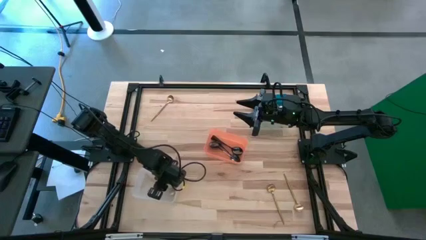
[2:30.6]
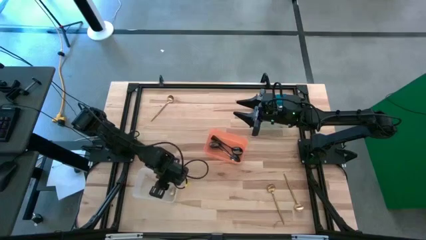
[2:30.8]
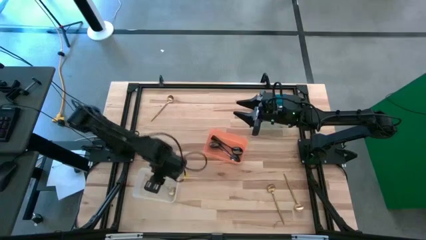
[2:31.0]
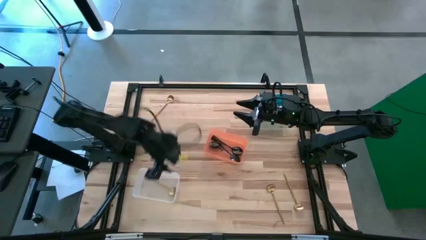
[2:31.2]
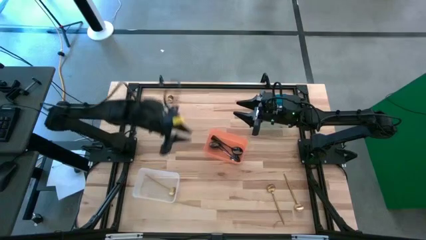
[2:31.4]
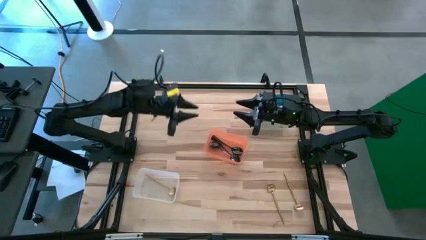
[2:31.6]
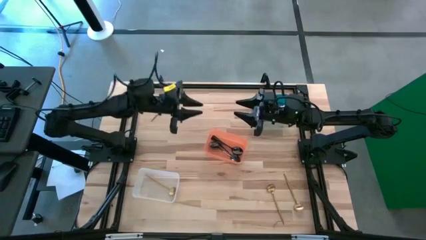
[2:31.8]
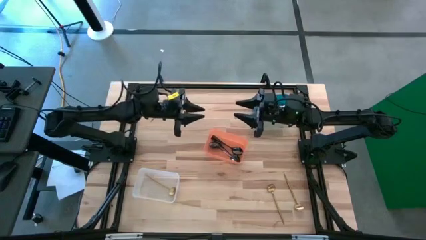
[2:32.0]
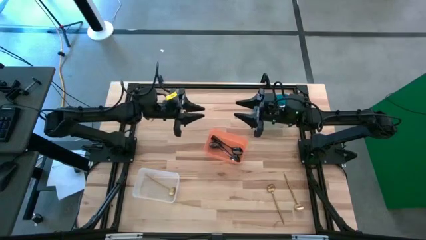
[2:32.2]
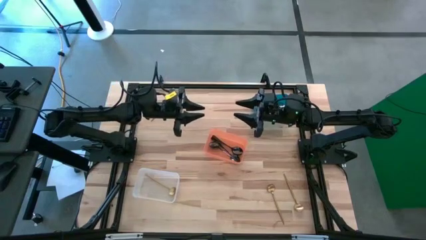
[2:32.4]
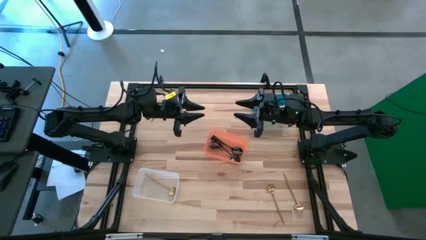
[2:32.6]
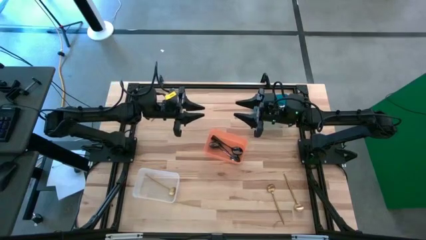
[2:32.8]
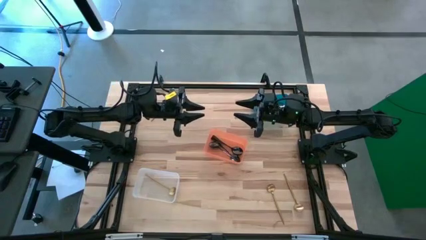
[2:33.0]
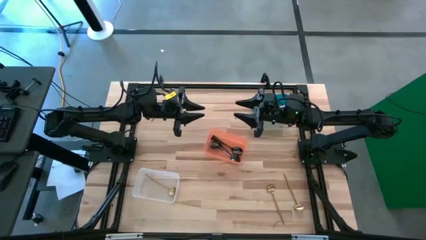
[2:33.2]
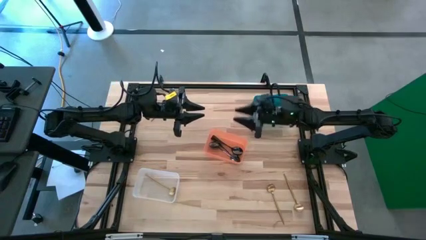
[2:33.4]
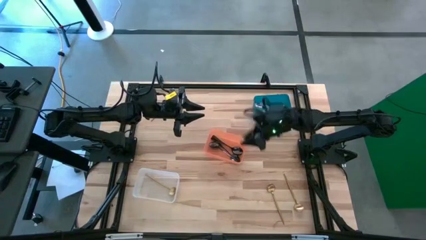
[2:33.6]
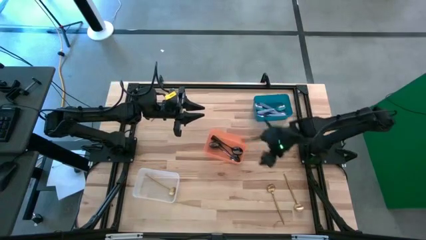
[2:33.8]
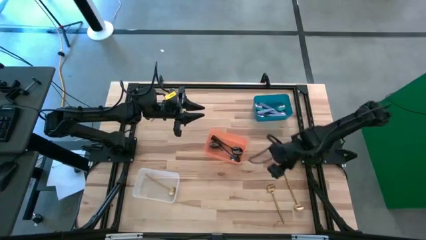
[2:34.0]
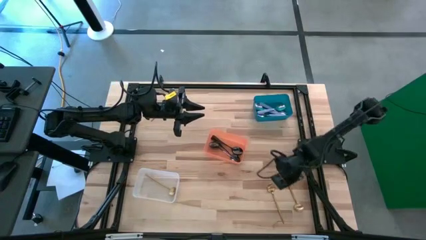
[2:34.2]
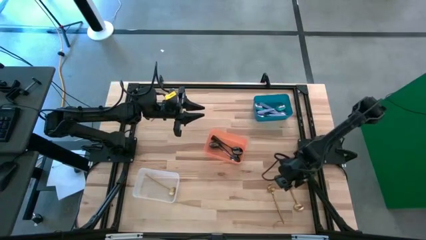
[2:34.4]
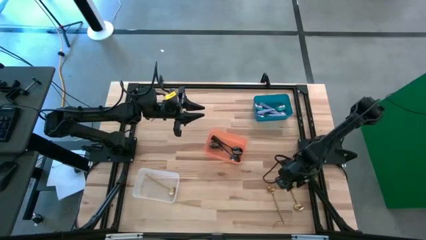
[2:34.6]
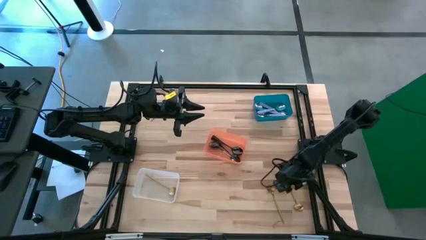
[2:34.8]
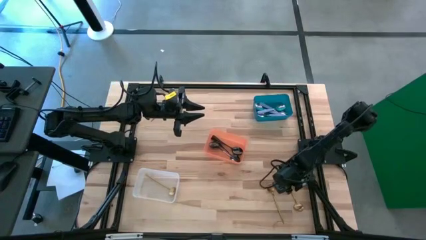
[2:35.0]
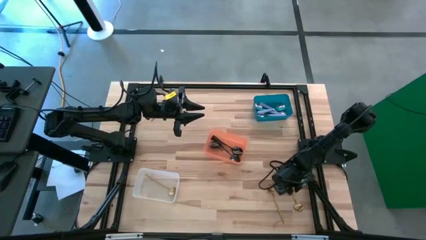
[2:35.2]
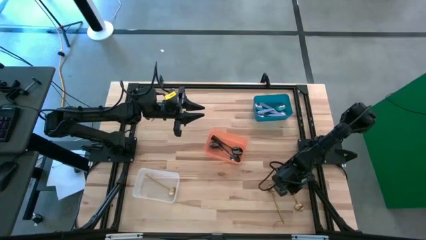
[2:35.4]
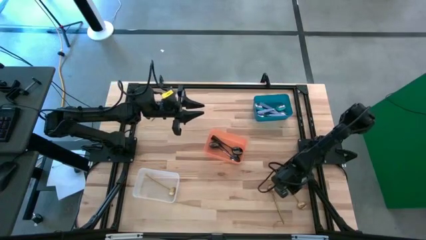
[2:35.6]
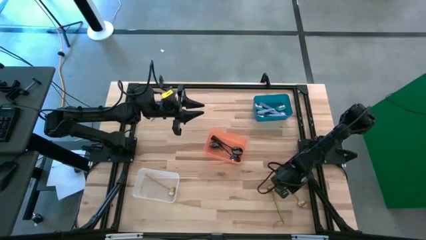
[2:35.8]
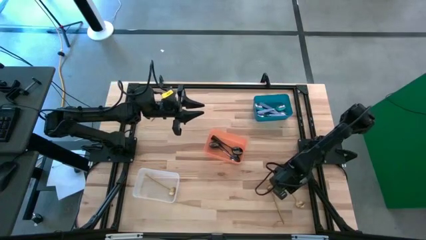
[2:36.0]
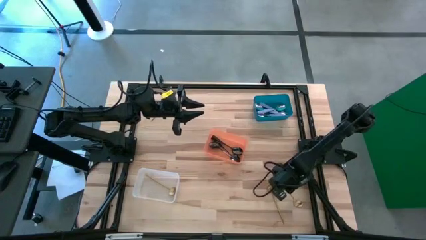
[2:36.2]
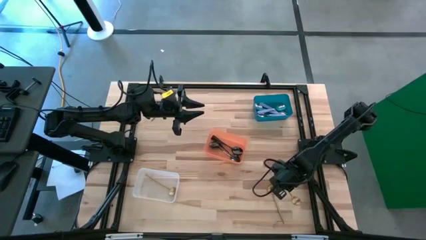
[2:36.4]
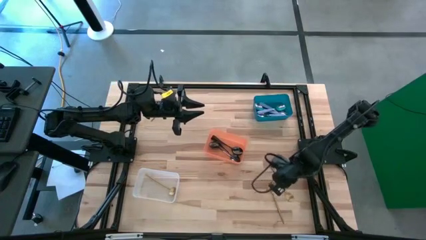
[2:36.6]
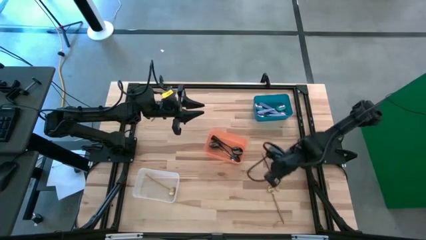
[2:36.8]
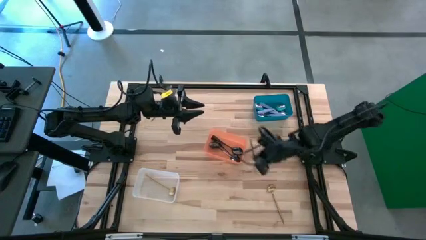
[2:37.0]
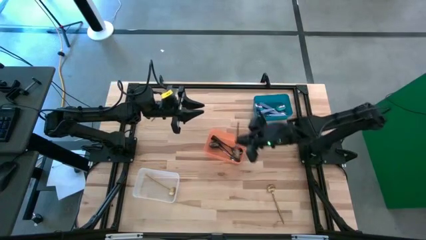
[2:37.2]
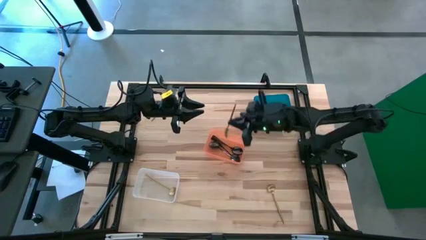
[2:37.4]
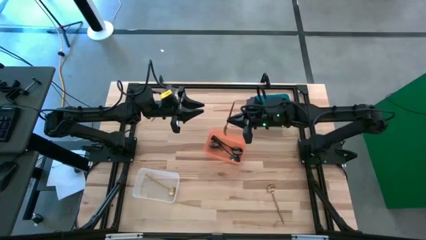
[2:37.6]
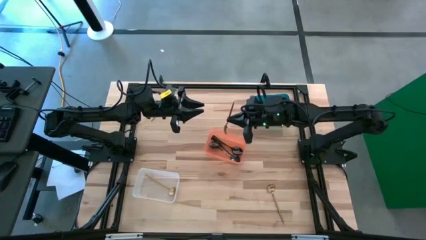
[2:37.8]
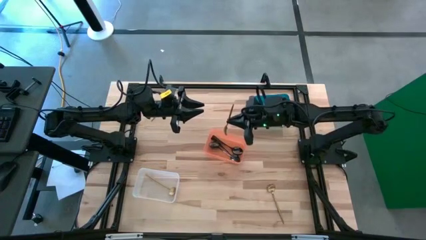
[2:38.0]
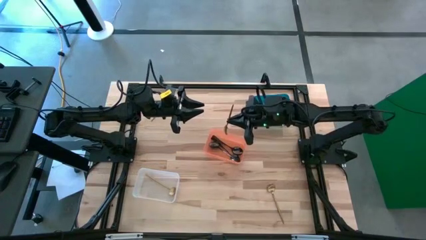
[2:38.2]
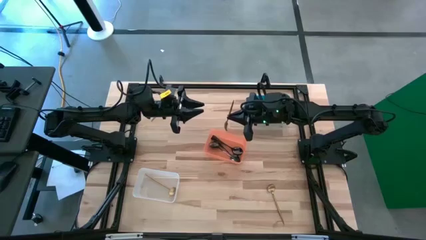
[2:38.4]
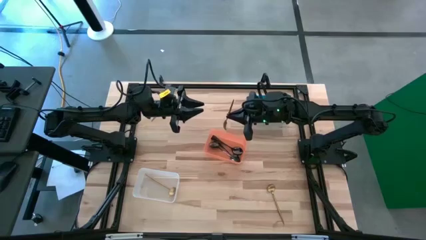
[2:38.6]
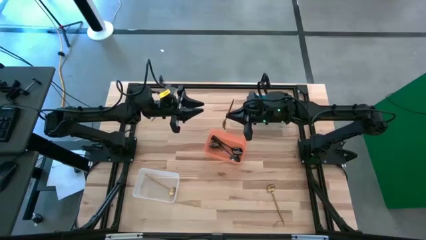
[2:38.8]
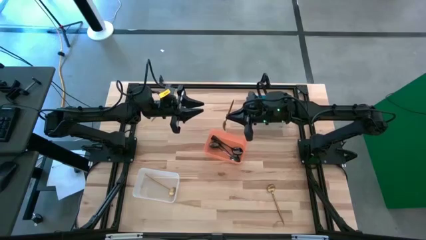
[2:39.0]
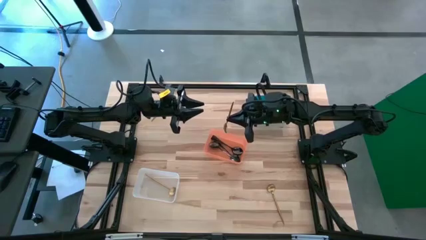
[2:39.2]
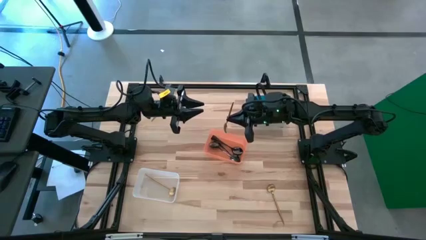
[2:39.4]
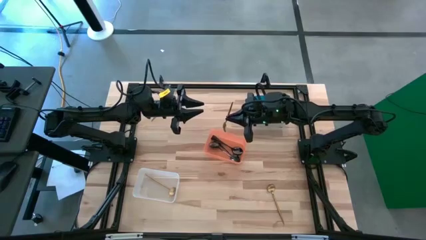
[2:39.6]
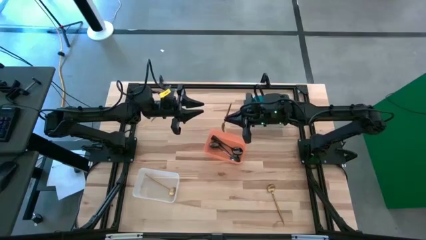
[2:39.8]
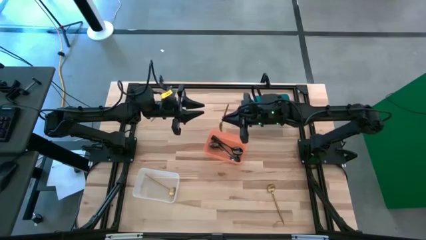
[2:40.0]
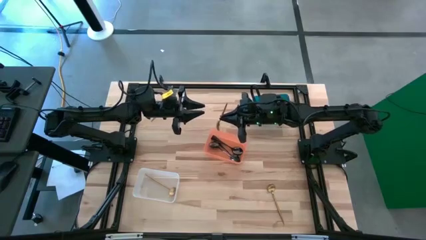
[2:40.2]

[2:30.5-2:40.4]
Task: Sort silverware by color (type)
Put the bottom right golden spoon into the white bin

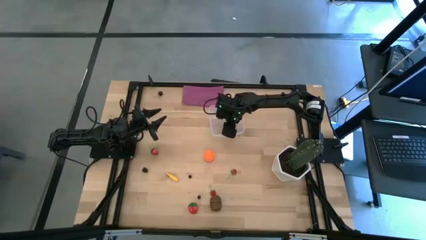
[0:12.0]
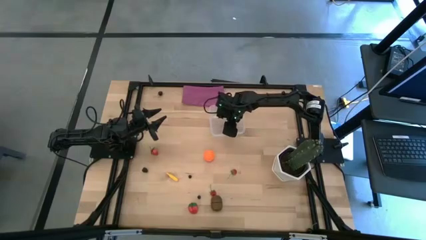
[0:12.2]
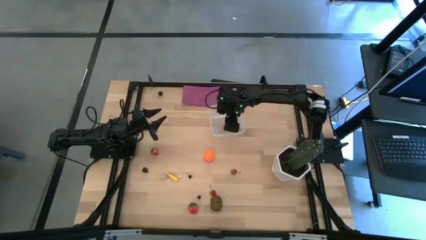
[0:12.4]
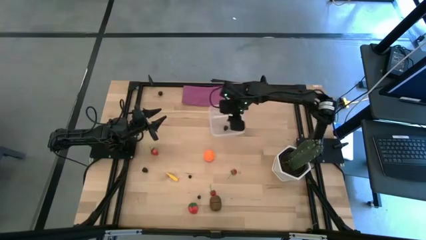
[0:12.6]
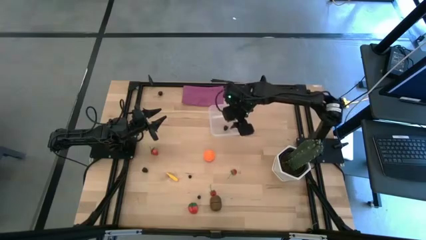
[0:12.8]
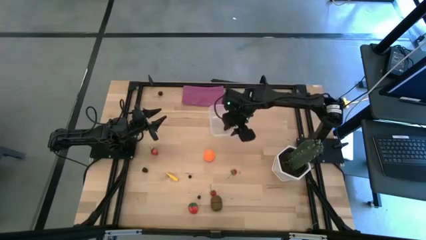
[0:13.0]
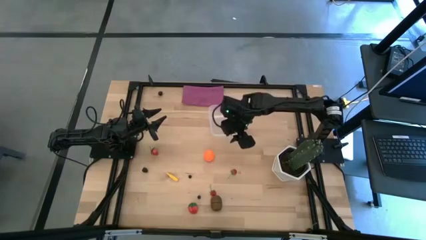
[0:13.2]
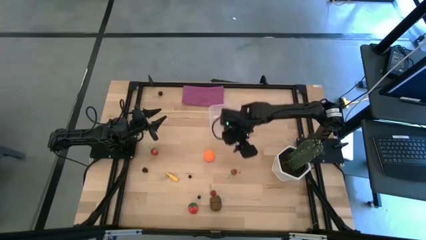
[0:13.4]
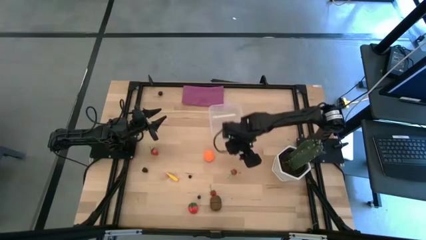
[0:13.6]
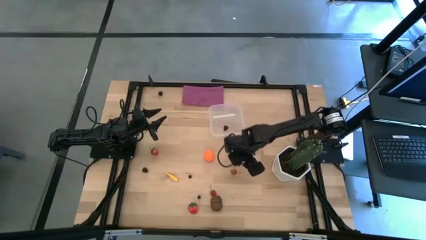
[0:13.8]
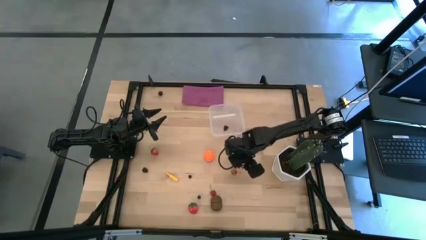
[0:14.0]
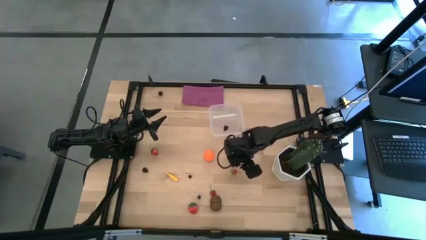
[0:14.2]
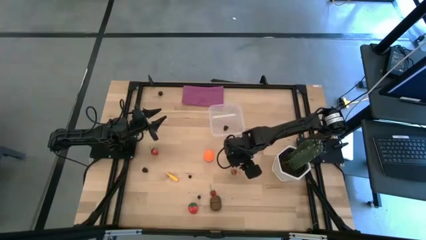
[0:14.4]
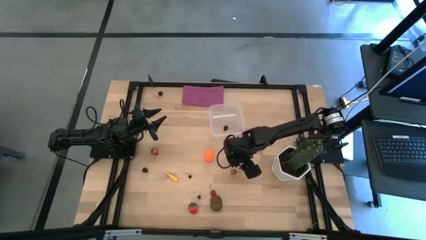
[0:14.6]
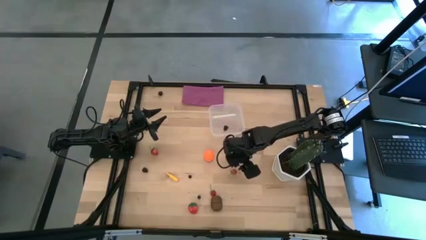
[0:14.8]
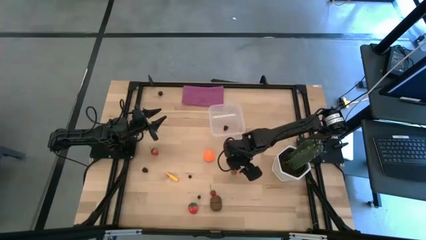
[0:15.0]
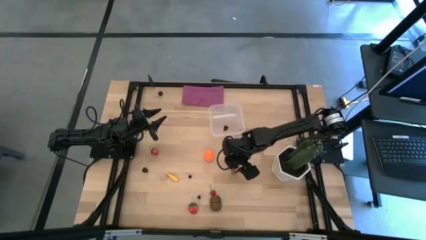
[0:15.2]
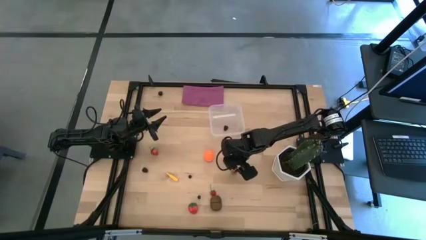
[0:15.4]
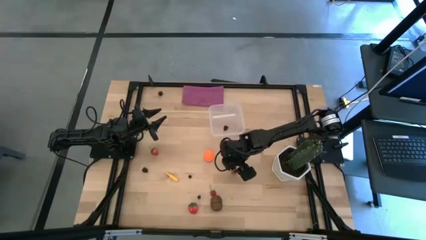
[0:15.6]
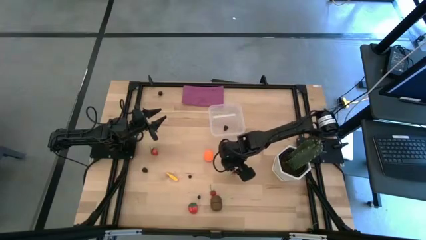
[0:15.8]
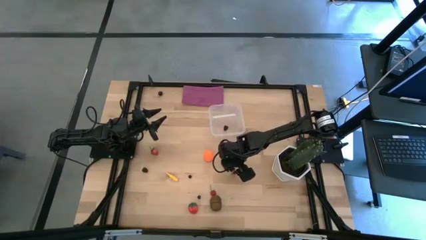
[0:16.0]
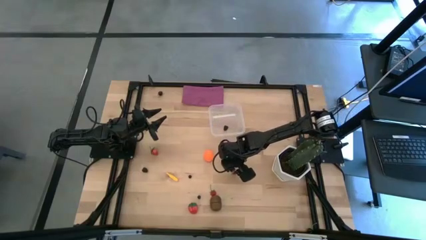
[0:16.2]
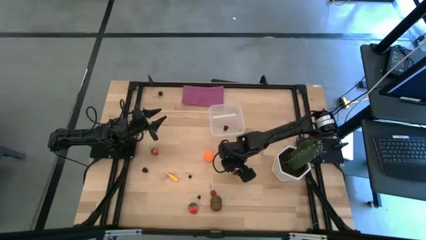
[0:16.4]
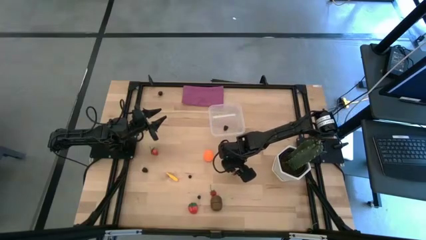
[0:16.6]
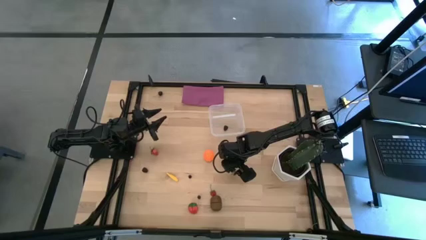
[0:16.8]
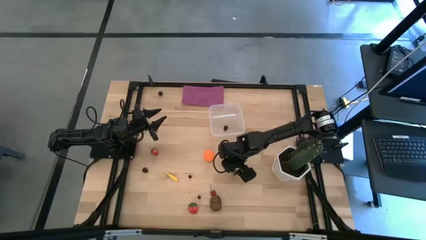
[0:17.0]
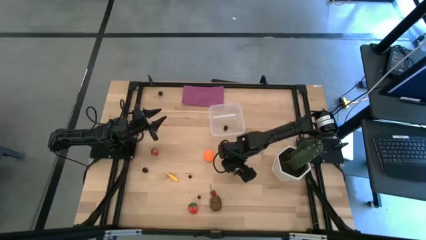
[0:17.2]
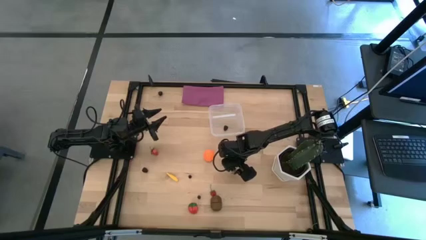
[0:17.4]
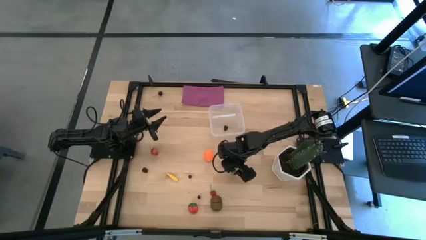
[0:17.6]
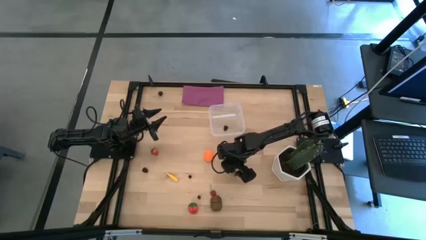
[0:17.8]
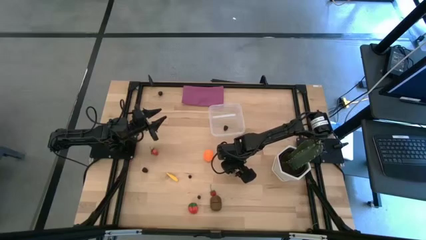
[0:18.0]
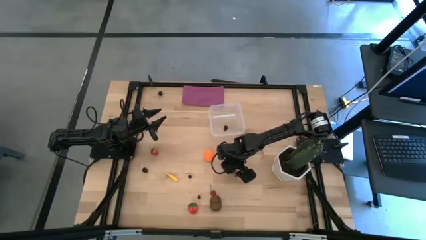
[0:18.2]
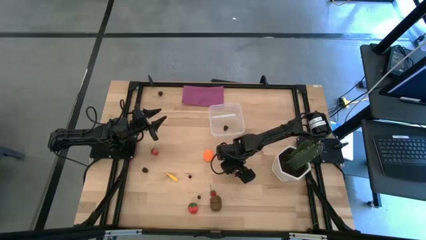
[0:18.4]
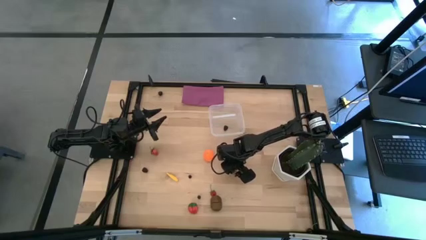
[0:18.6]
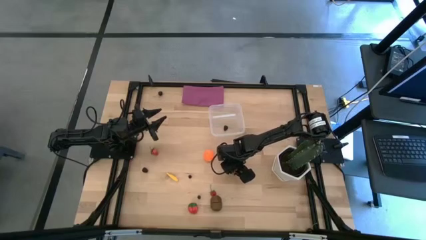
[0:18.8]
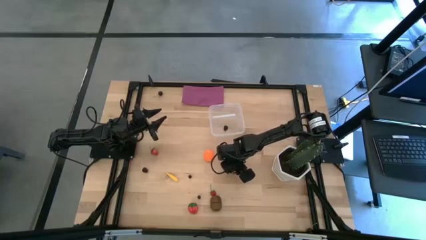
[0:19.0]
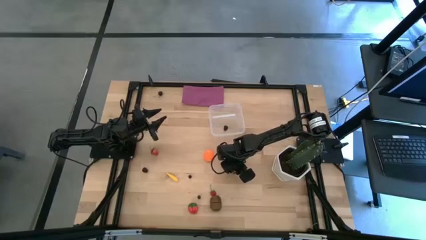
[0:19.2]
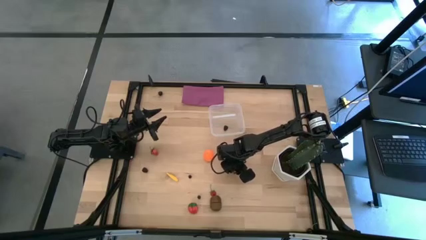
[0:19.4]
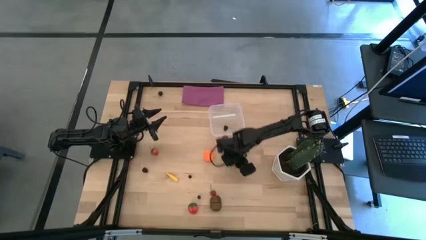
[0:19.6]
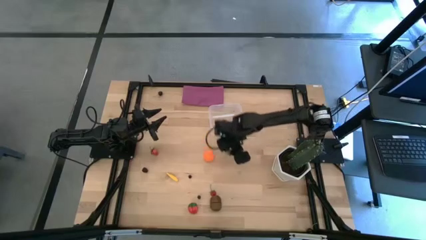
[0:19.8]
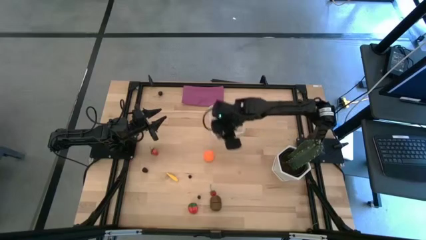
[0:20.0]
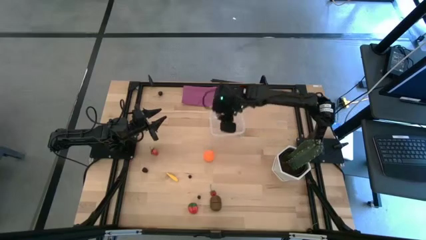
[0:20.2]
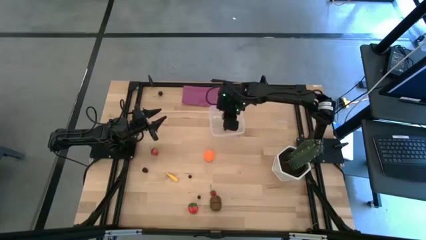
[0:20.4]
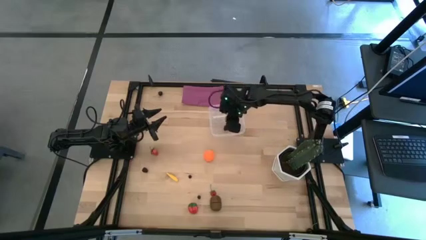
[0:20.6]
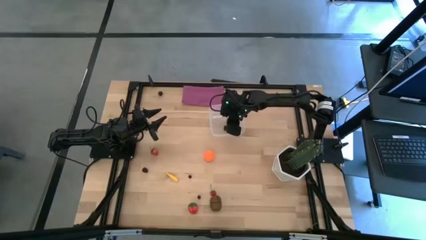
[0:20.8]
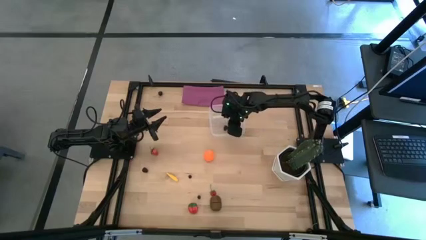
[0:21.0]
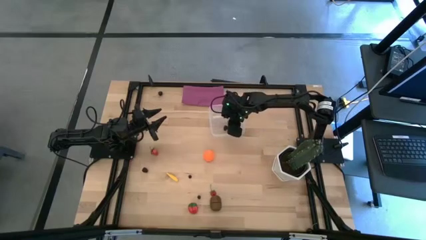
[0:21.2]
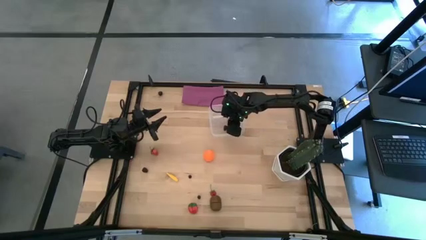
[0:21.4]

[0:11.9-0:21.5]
Task: Pick and placing Produce into tupperware
Put the right red strawberry into the transparent bin
